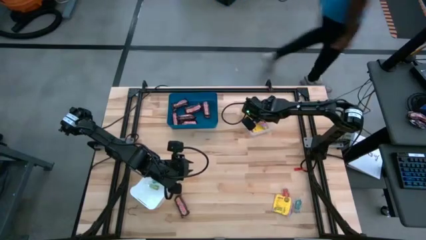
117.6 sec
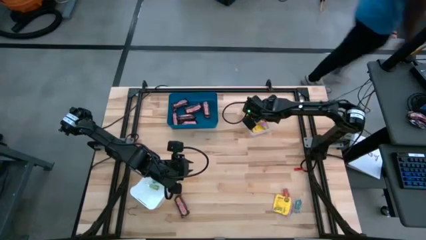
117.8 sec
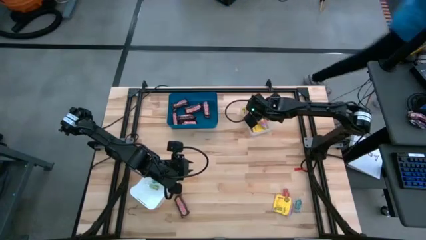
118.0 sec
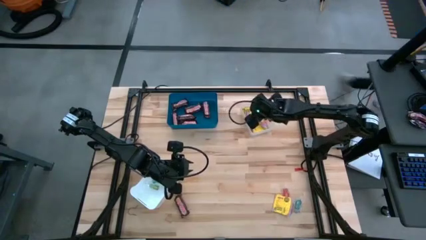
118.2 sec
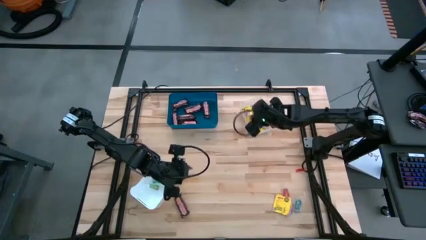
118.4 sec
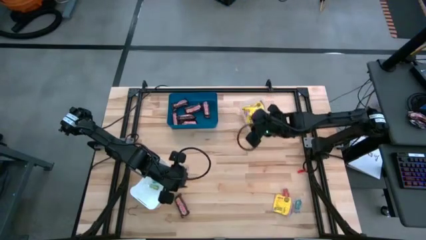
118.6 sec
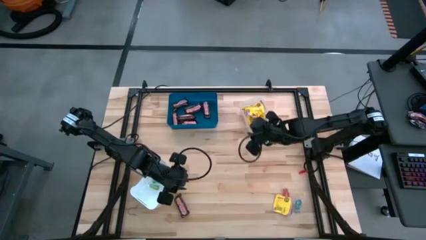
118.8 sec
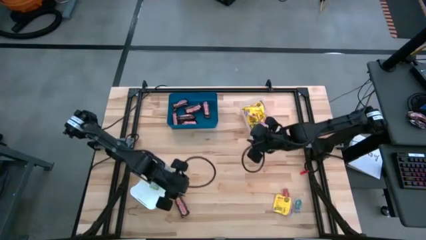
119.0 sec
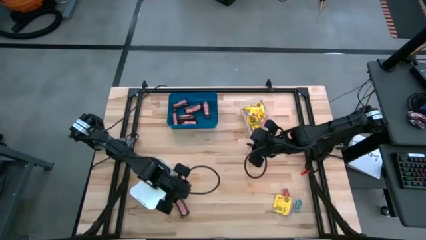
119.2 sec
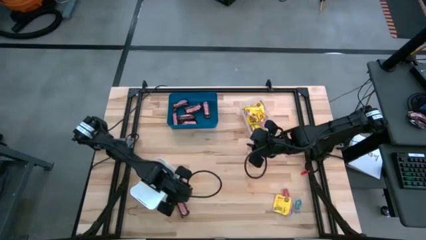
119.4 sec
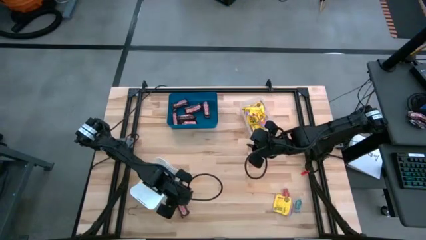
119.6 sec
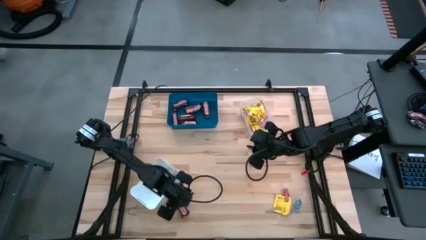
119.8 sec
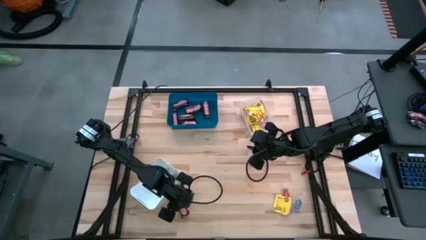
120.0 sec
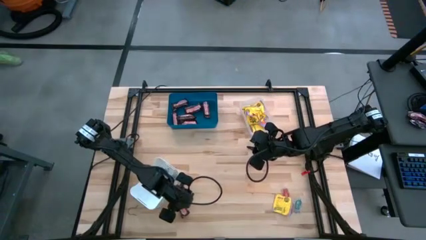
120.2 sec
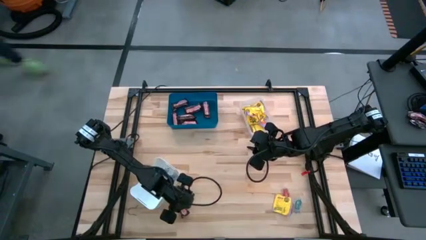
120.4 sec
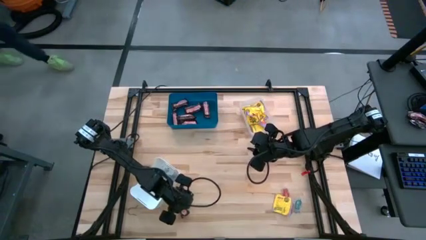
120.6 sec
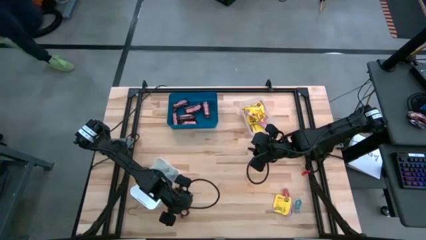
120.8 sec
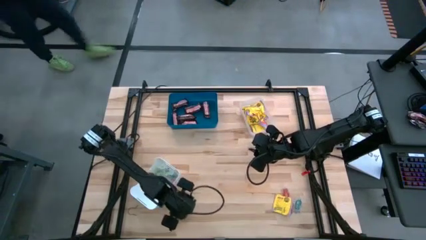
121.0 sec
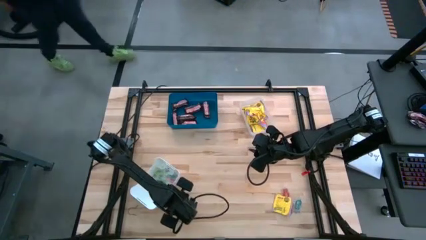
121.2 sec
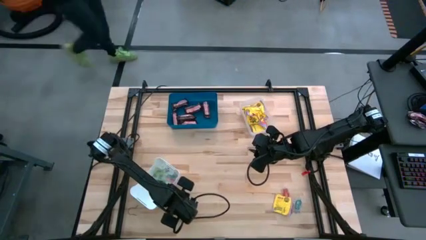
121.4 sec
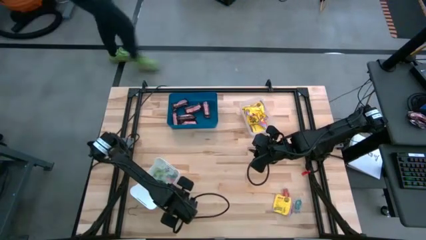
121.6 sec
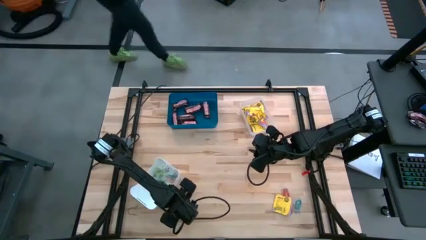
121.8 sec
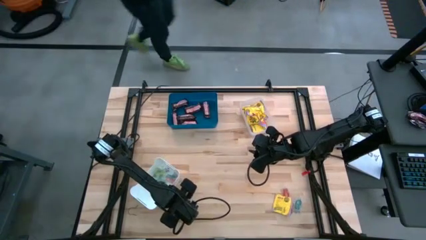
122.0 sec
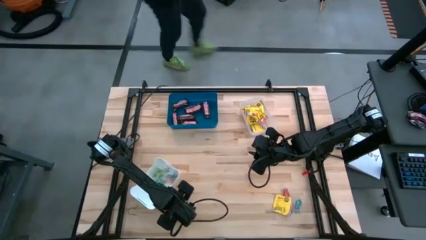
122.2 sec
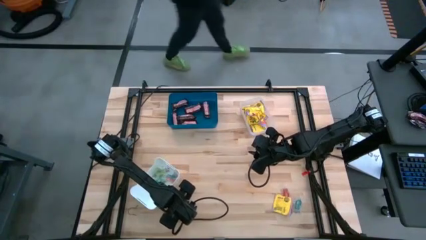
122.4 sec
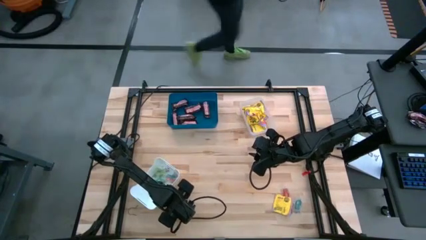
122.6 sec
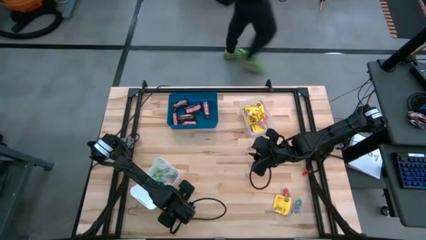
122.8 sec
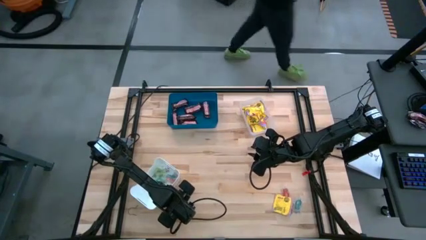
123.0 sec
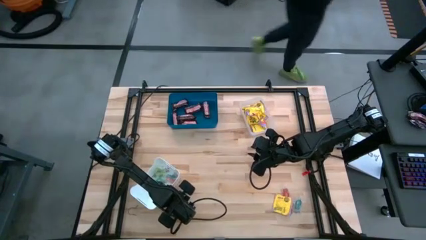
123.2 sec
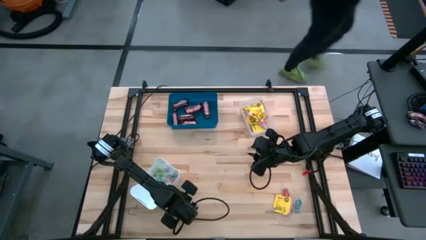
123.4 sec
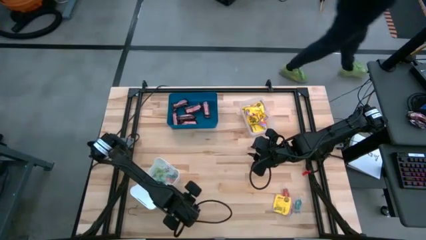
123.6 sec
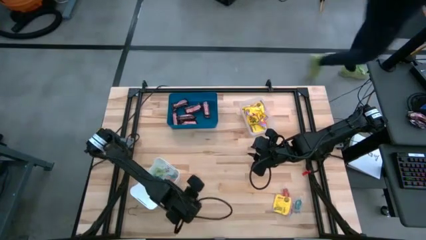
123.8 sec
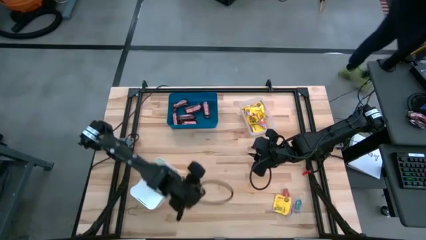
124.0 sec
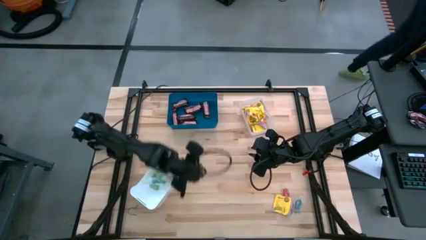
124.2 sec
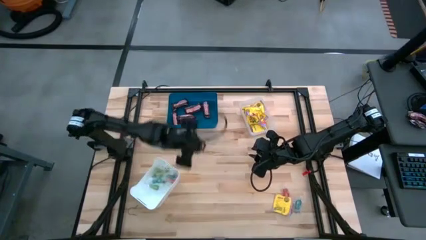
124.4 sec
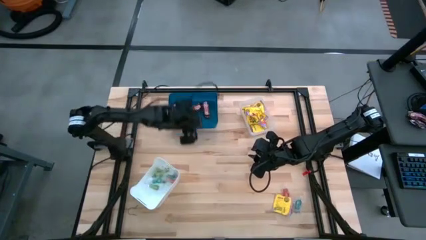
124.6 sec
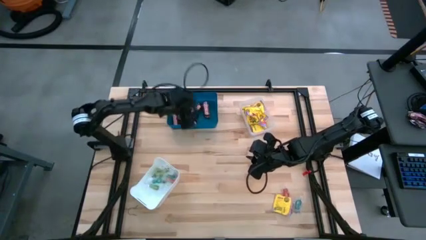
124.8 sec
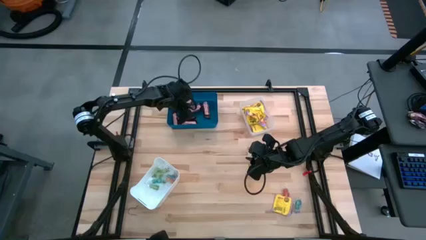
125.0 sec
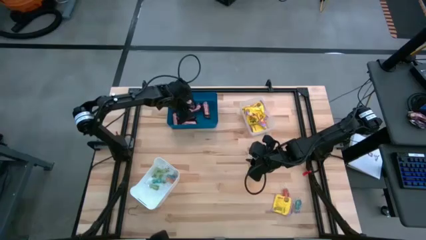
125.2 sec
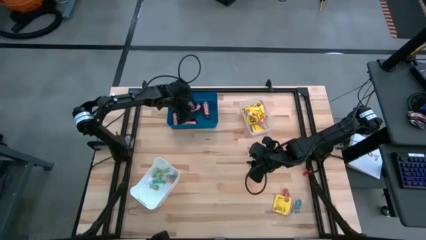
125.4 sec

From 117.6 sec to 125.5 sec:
Task: Sort candy
Put the brown chocolate into the blue bin

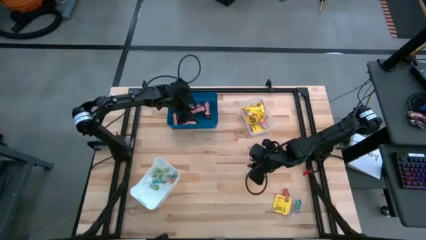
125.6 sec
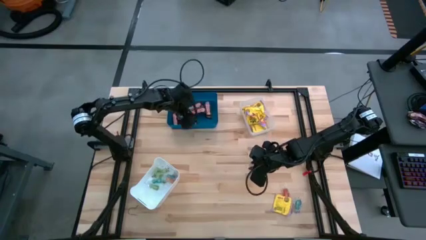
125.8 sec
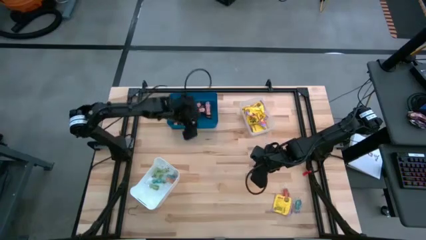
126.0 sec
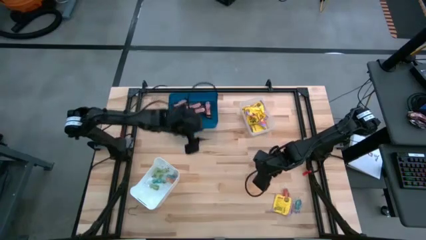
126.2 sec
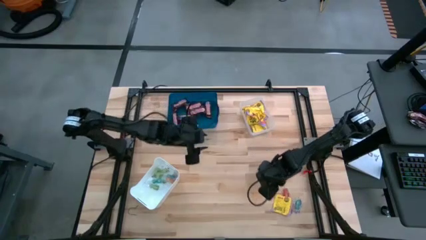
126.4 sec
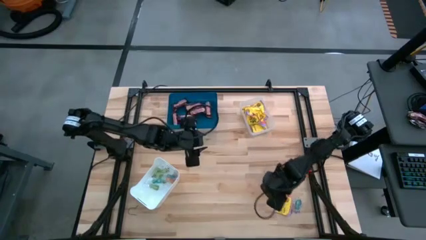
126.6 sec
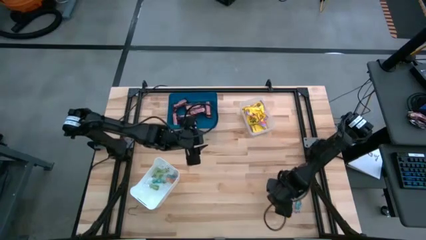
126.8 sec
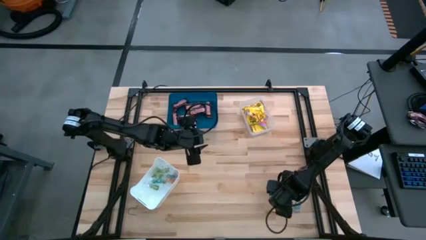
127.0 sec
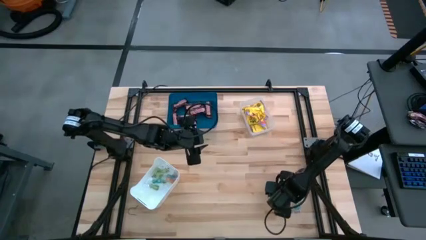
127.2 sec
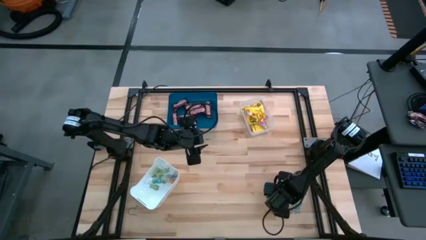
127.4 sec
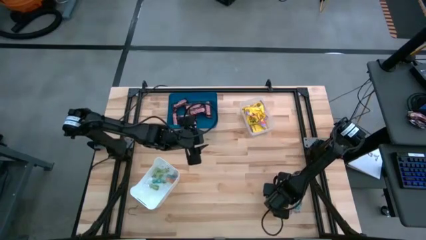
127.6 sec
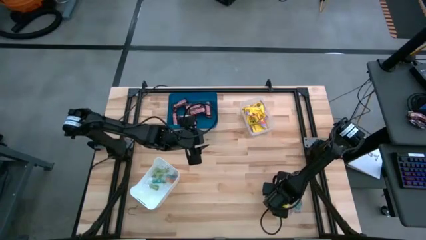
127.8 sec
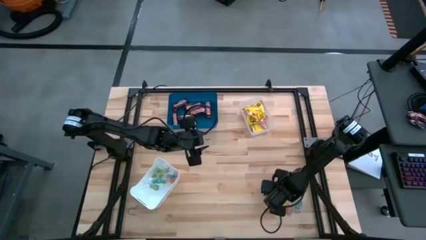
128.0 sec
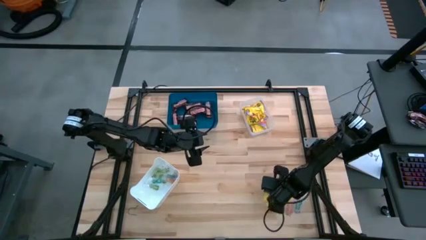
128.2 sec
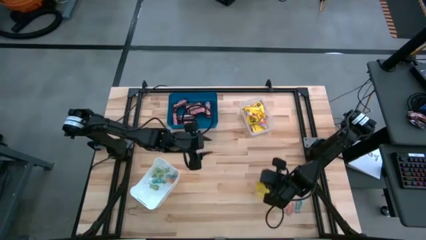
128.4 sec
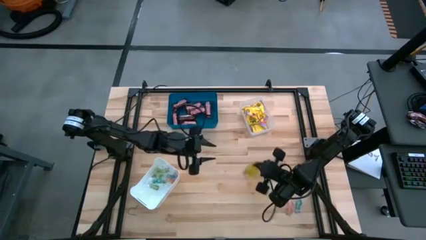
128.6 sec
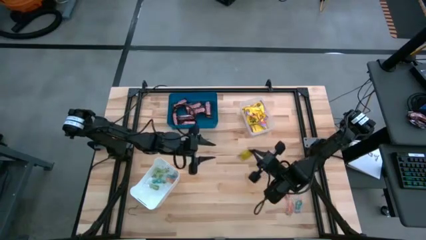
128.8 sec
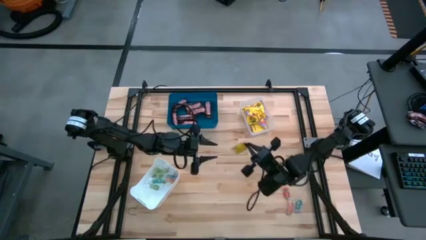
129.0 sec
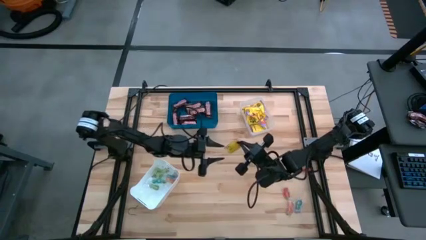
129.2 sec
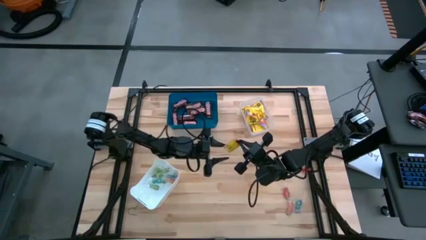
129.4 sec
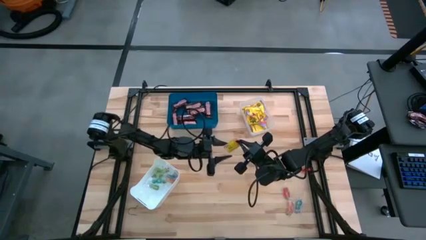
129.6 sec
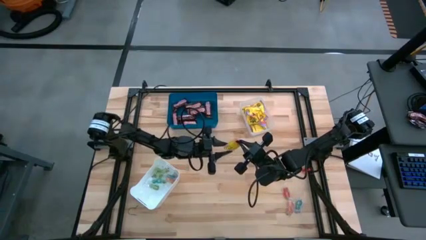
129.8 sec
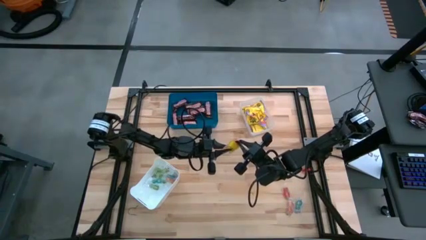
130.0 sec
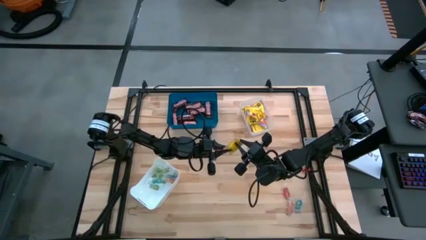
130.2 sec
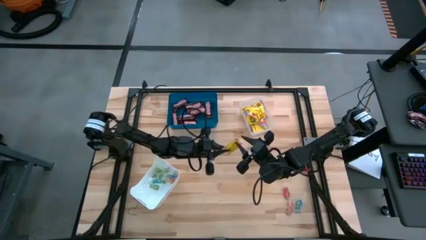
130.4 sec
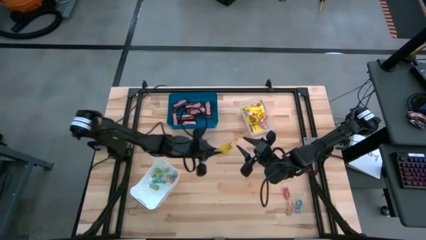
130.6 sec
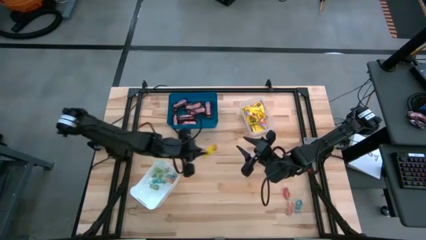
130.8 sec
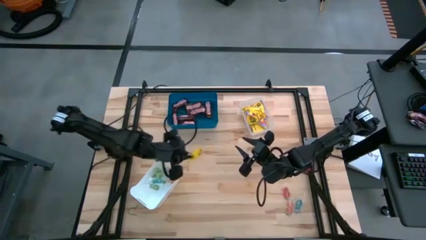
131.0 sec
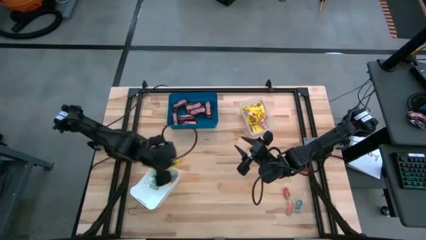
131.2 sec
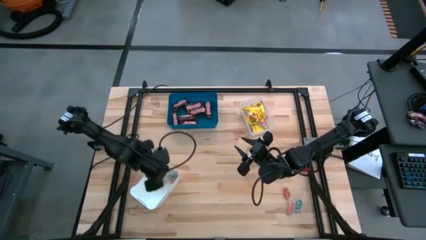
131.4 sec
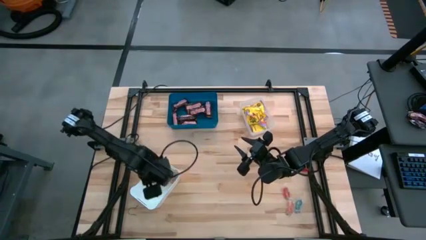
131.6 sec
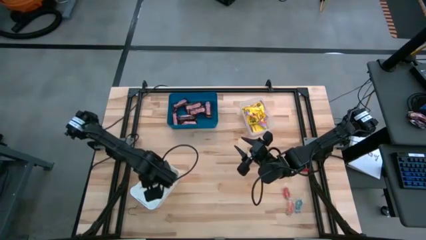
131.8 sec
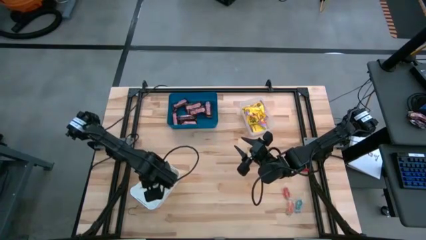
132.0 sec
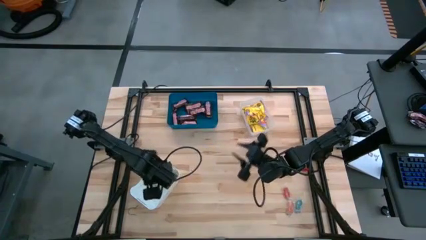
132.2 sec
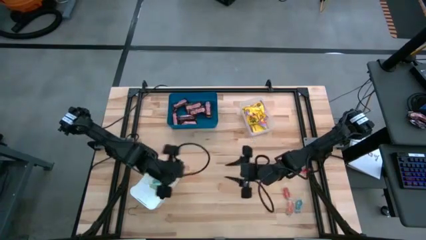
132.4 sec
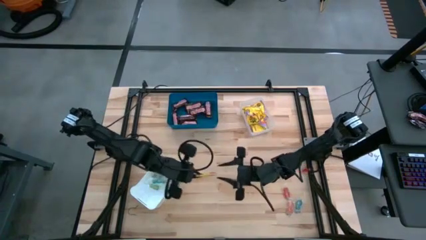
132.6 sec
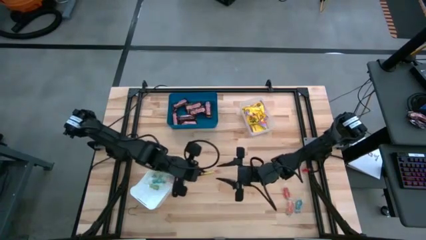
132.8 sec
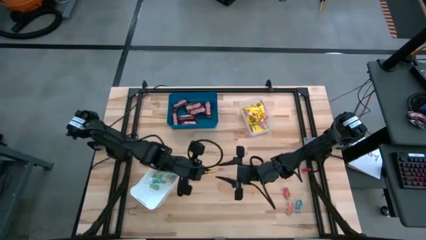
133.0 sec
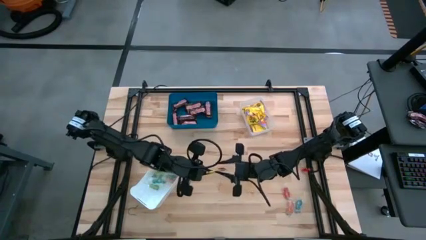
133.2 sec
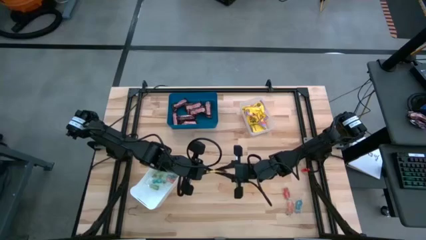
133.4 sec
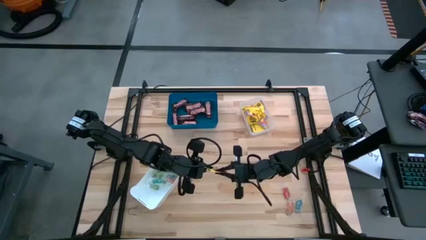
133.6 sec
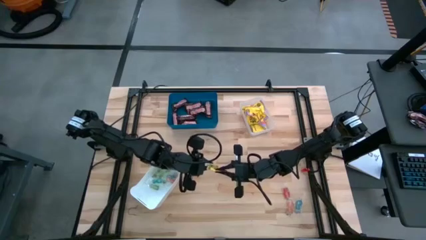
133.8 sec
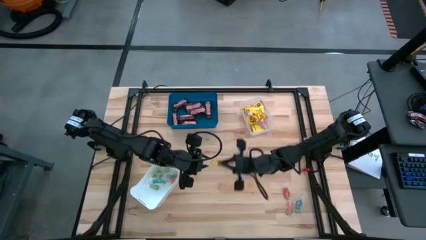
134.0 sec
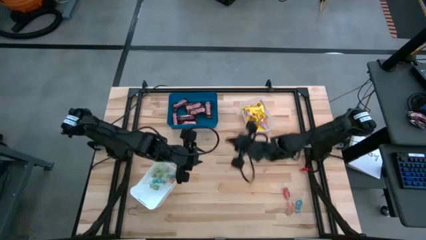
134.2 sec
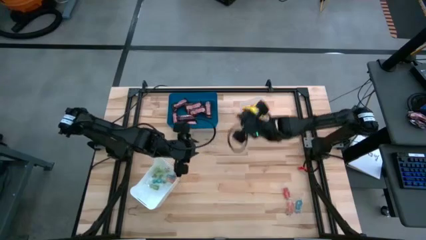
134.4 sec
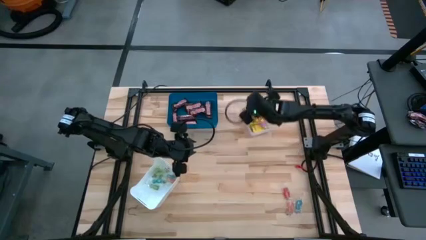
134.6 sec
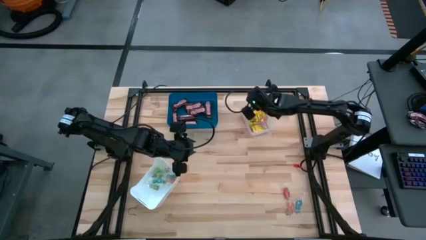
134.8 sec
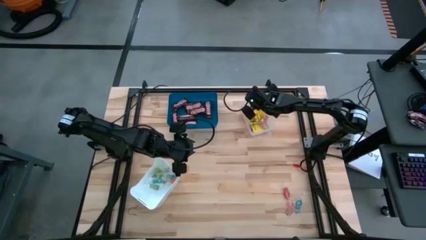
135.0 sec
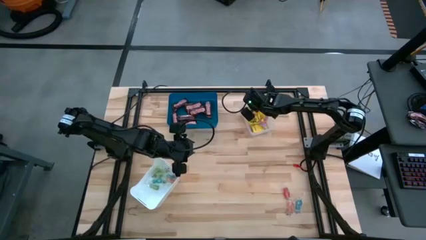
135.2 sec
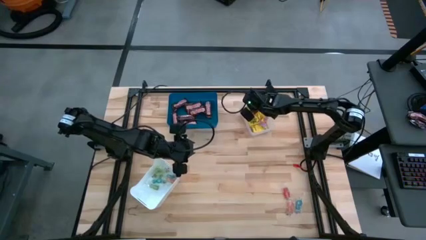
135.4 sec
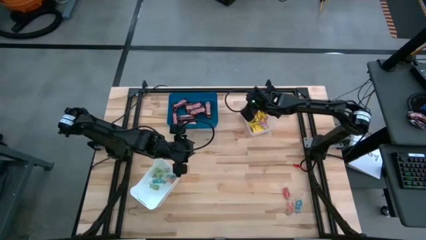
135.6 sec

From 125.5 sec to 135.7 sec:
Put the yellow candy into the transparent bin
